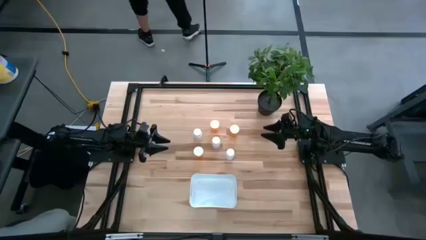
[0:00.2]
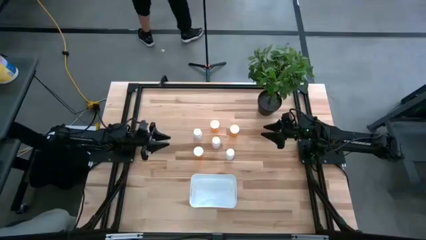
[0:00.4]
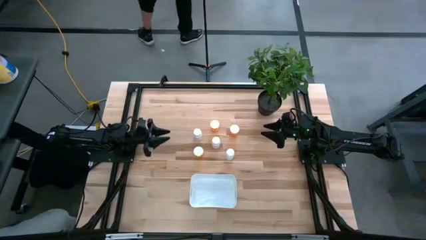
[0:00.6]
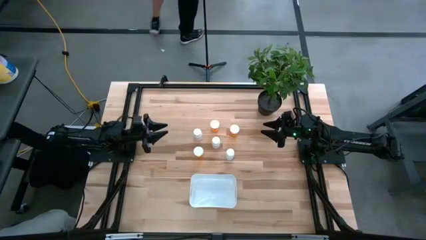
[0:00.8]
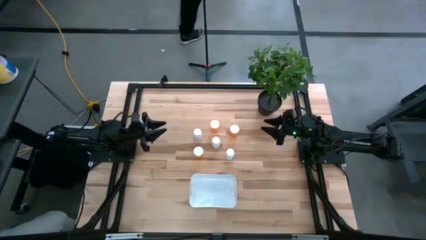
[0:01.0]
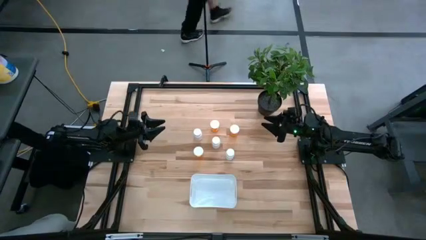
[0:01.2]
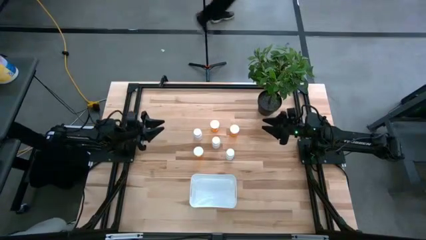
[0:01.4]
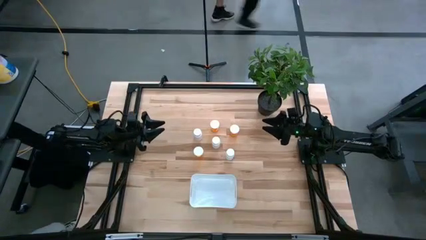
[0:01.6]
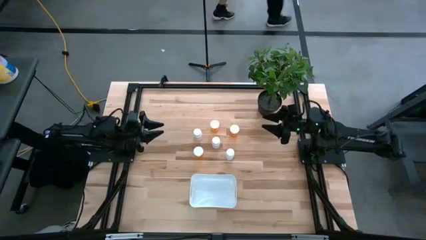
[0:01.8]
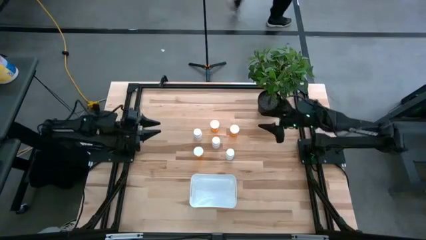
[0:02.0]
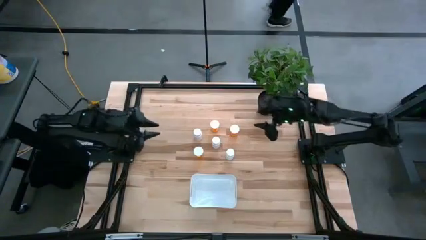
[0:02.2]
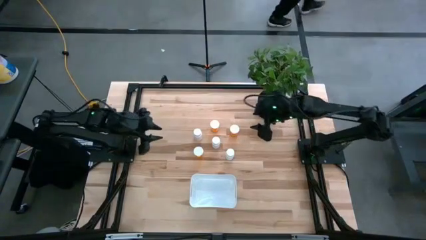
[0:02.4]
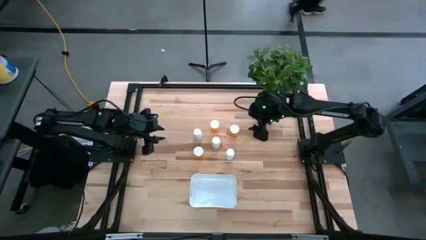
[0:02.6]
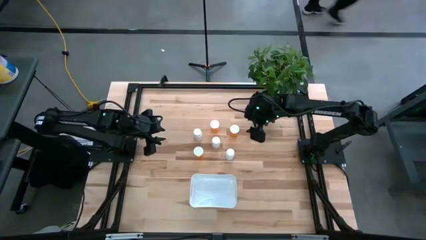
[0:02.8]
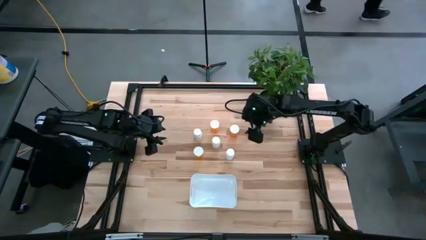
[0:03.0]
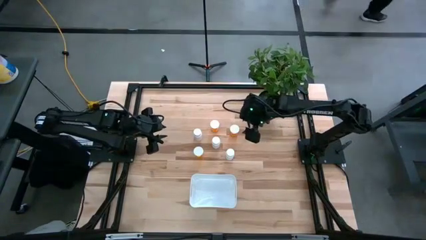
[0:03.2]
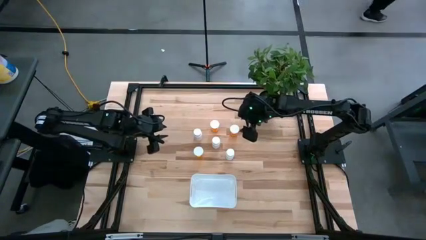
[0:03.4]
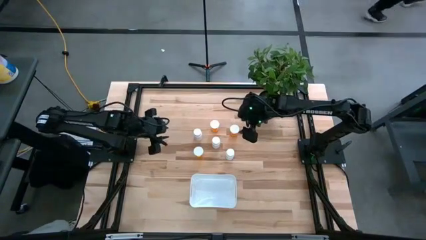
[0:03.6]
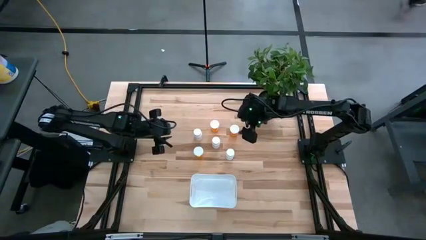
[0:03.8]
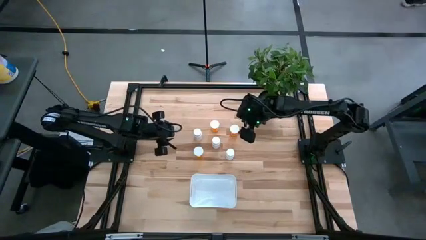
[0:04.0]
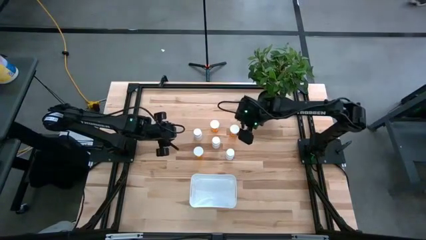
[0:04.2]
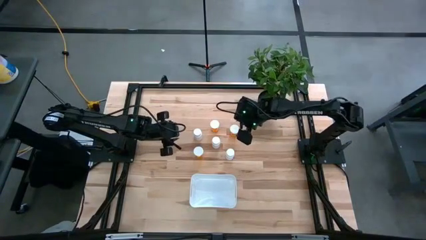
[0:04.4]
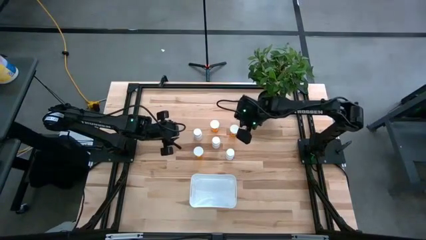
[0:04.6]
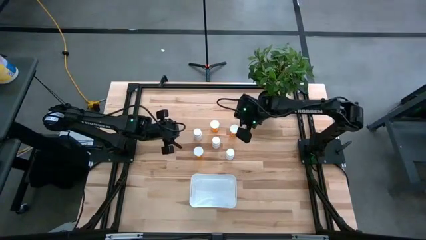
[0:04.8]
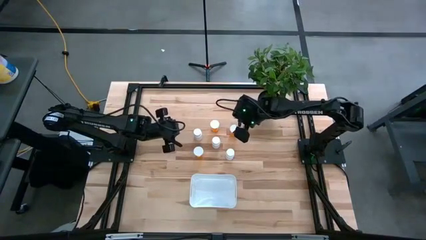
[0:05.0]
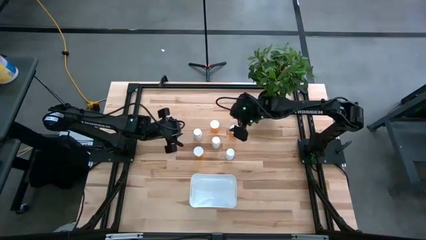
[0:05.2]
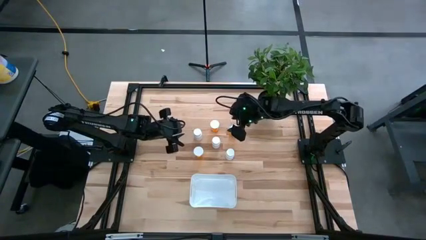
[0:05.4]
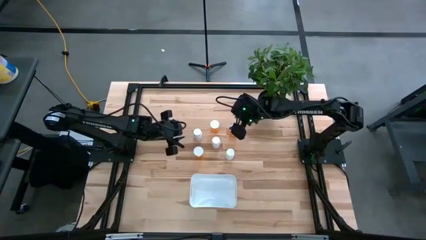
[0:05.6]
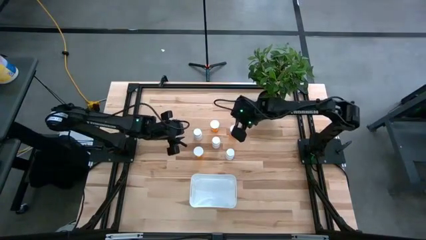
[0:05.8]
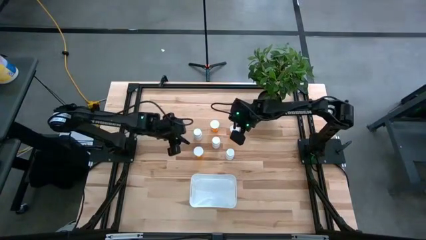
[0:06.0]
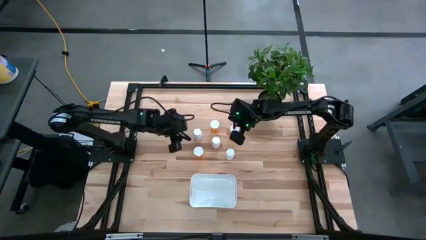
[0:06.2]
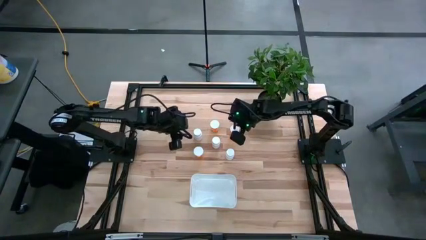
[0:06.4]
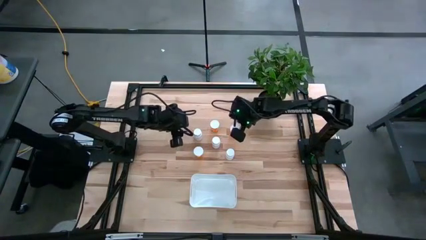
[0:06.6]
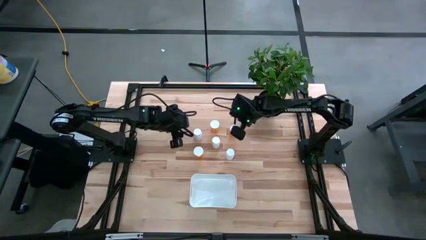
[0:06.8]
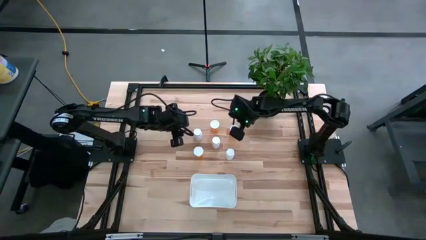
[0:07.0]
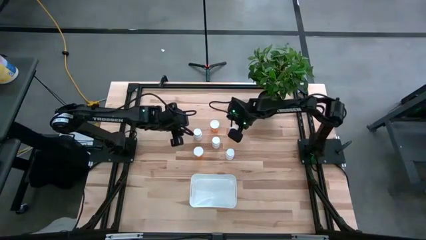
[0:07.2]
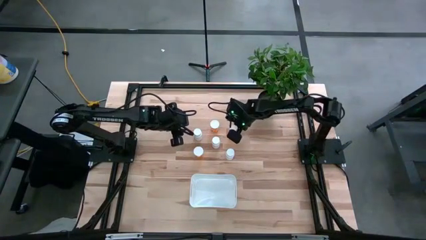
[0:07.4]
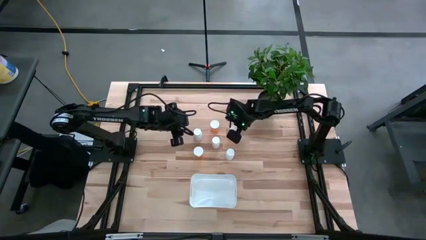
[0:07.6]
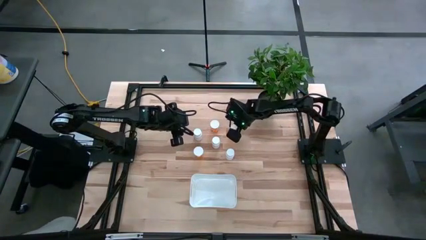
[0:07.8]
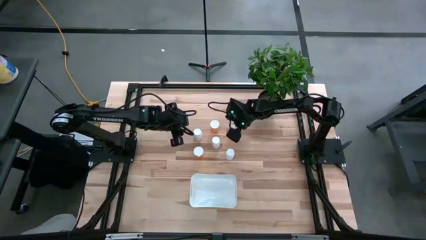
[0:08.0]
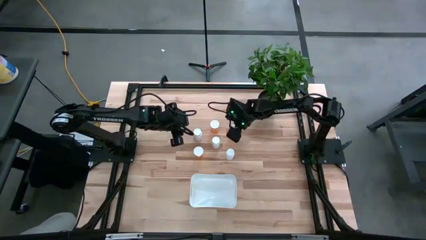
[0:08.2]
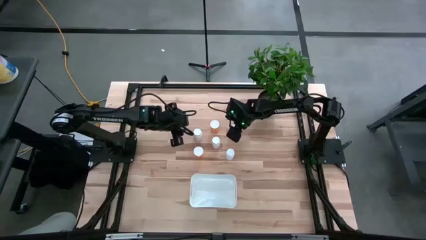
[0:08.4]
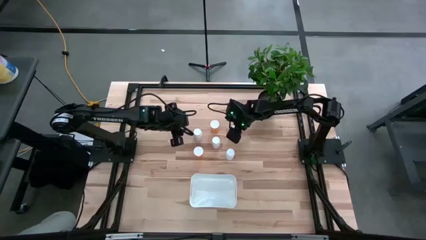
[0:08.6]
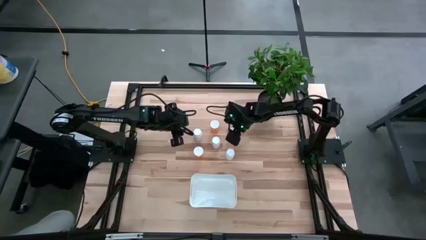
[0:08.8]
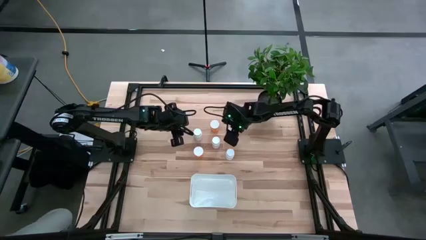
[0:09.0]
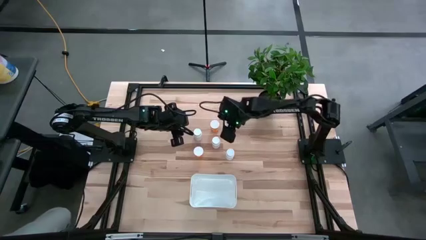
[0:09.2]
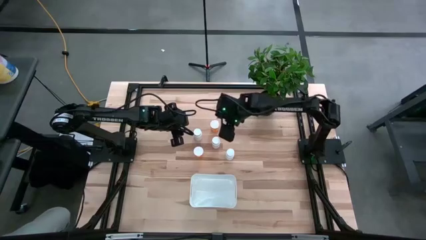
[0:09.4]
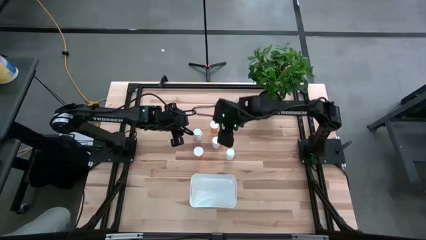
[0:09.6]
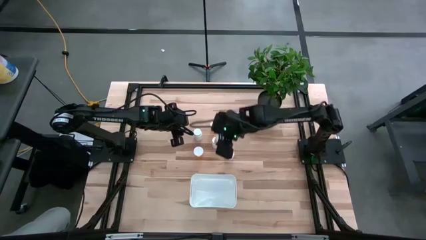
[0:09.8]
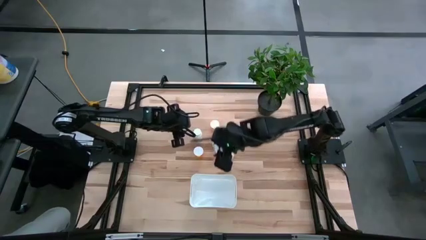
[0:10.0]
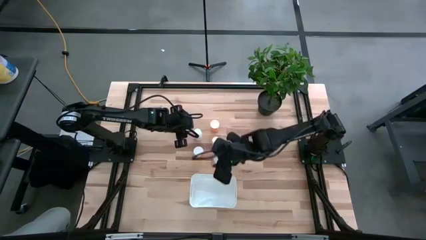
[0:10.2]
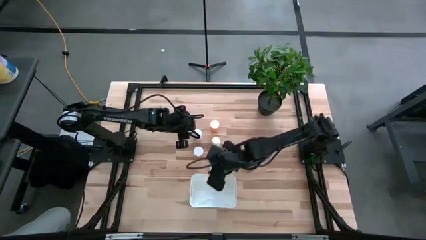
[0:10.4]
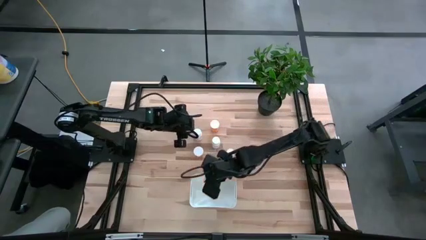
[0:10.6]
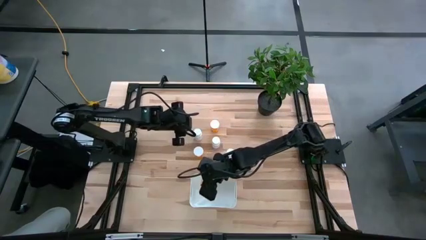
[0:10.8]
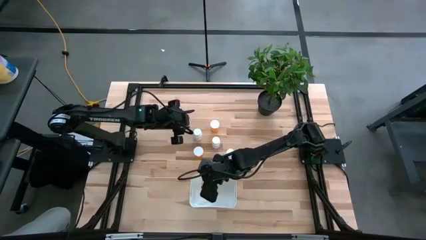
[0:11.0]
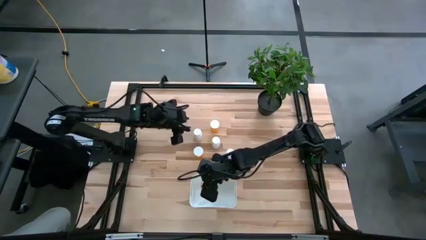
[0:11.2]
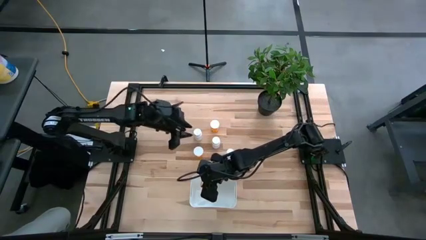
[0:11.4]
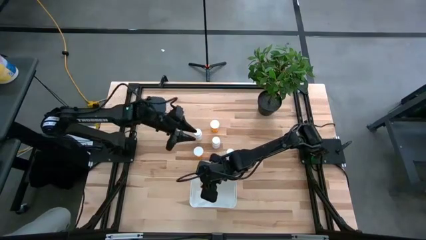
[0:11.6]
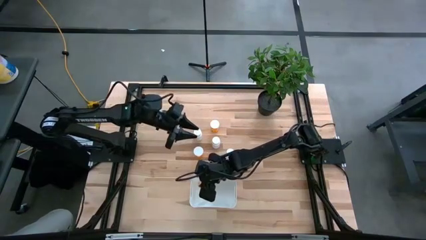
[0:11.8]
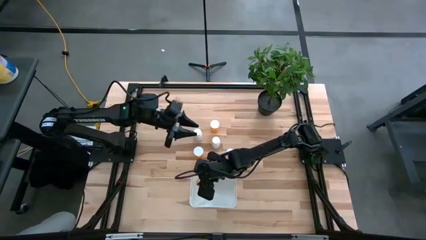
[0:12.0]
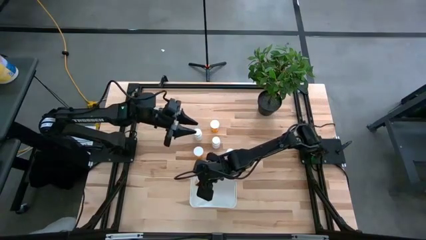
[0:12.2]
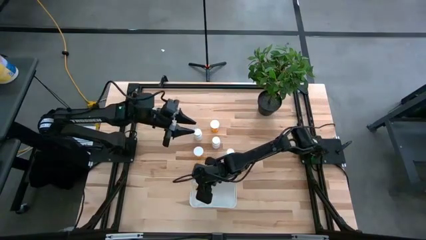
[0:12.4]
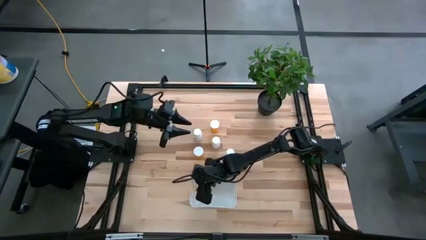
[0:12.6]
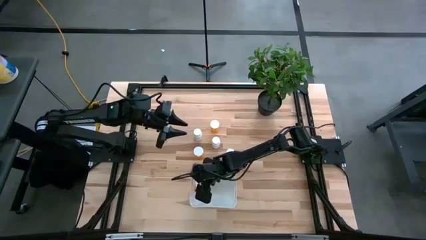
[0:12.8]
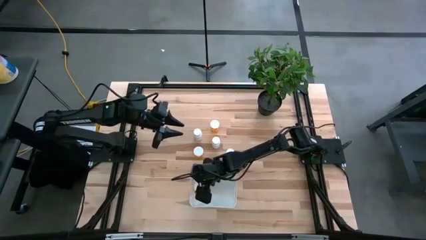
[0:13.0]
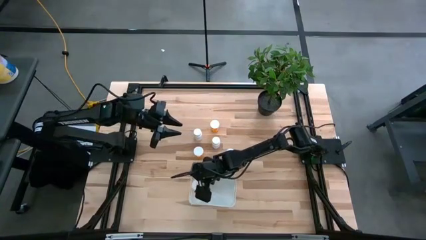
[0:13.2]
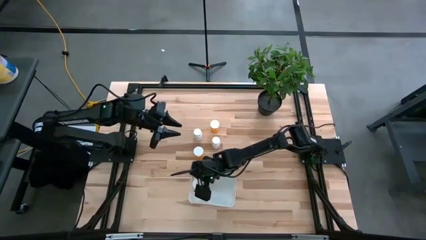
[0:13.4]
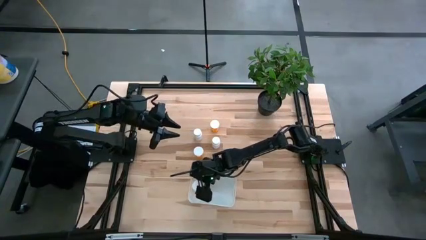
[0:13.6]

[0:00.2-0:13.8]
Task: Pick and place pill bottles into a basket
Put the top right orange pill bottle in the white bin
